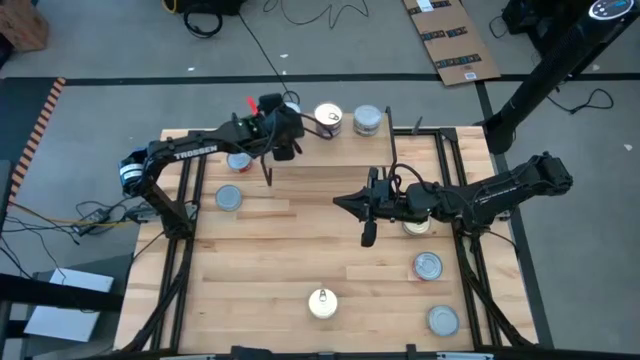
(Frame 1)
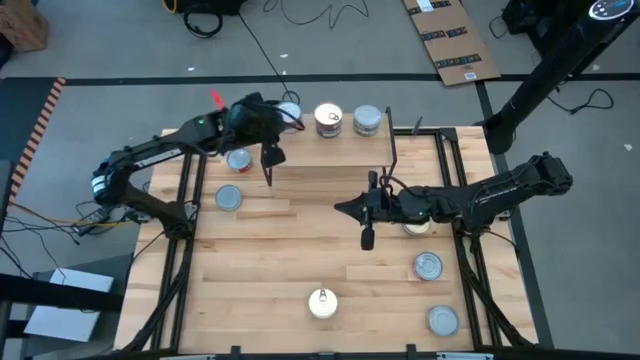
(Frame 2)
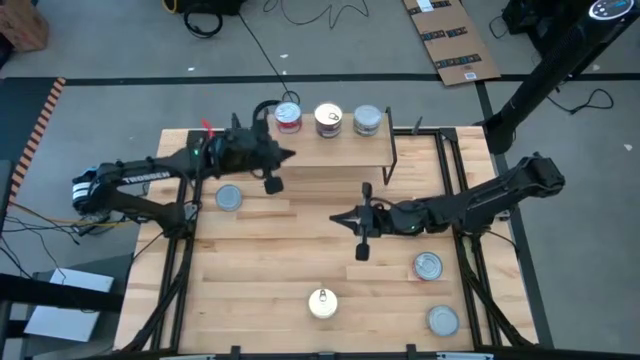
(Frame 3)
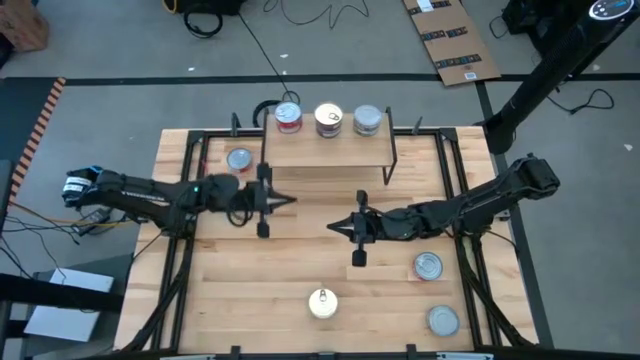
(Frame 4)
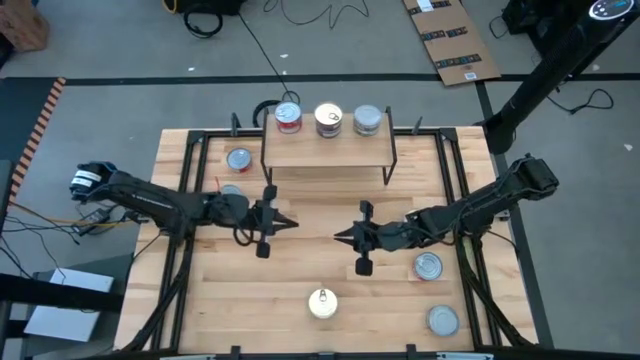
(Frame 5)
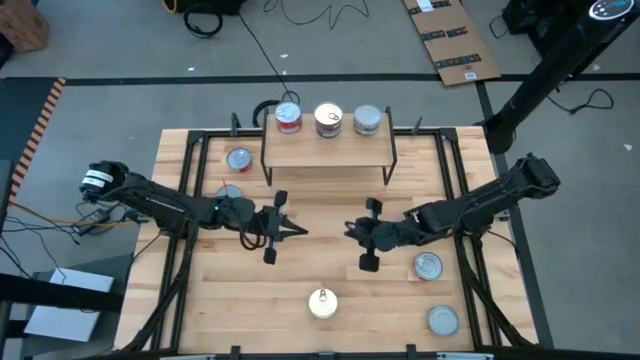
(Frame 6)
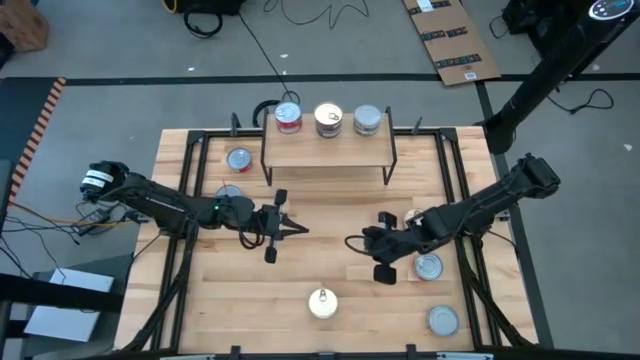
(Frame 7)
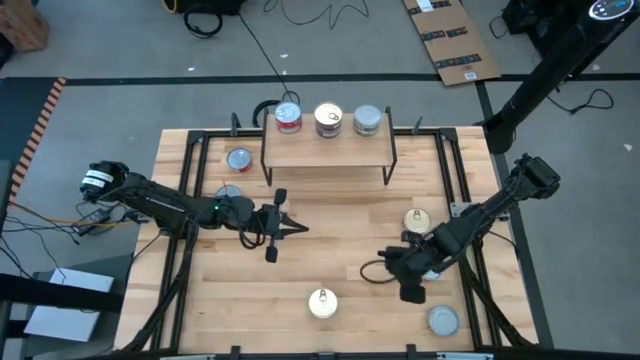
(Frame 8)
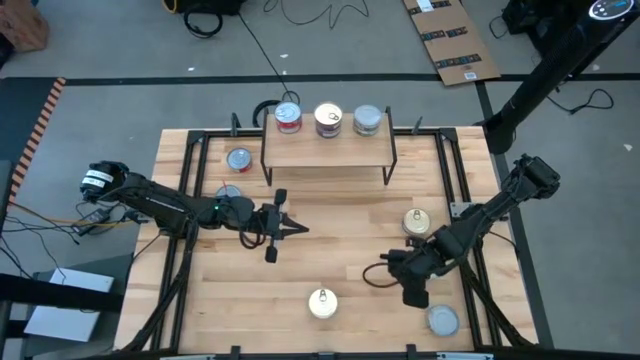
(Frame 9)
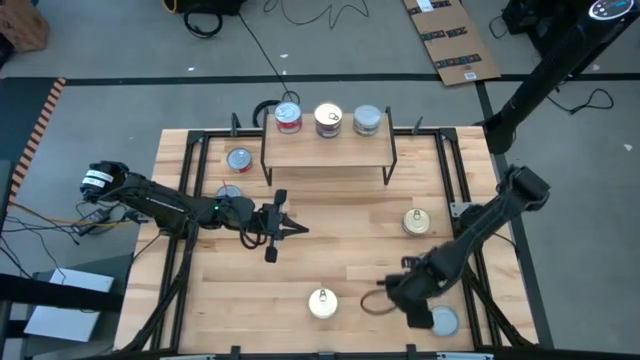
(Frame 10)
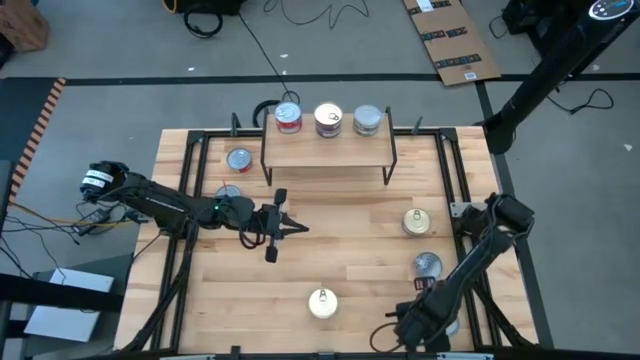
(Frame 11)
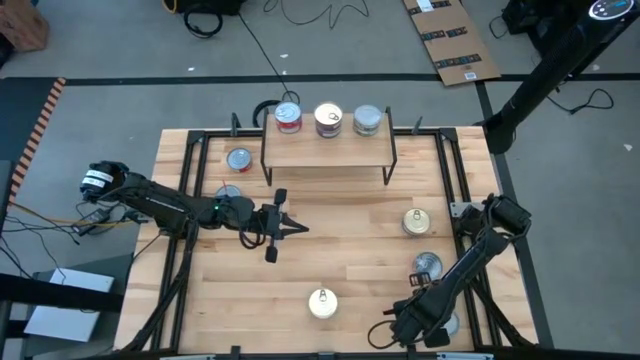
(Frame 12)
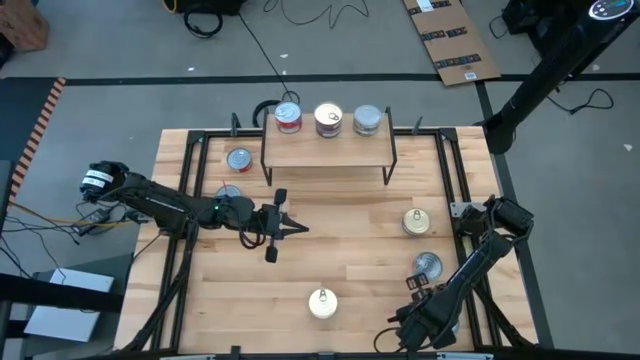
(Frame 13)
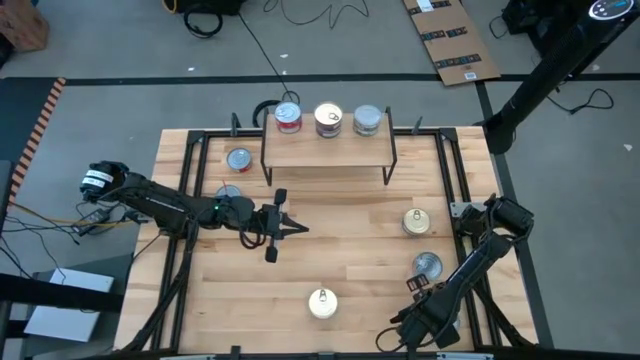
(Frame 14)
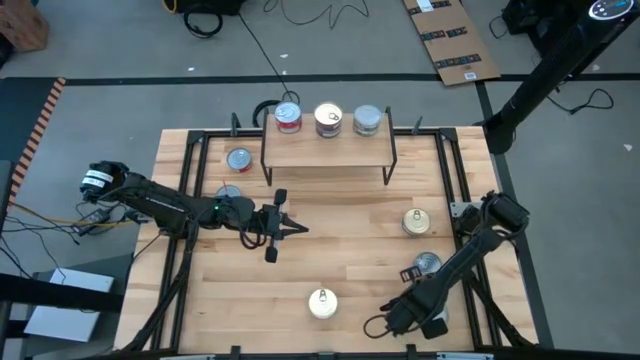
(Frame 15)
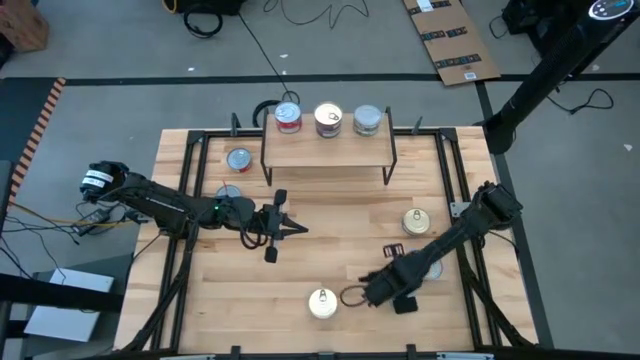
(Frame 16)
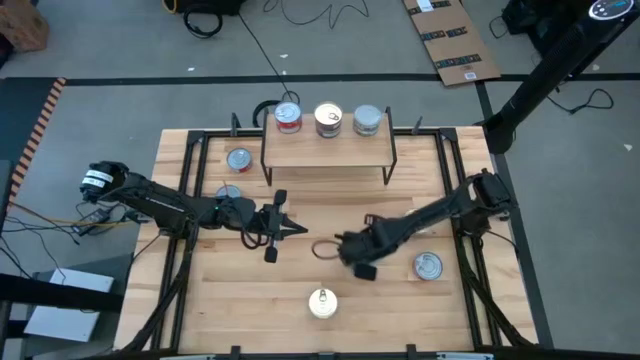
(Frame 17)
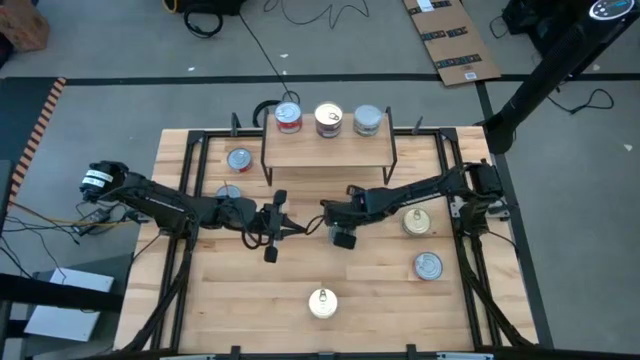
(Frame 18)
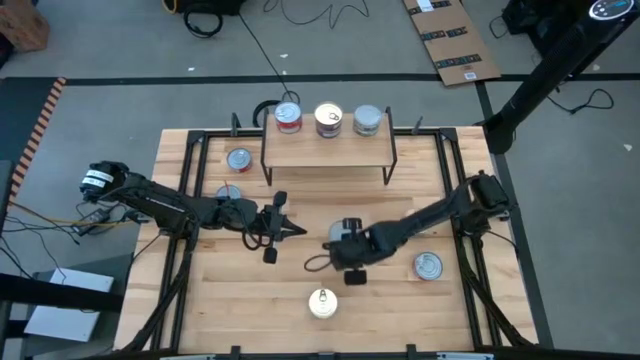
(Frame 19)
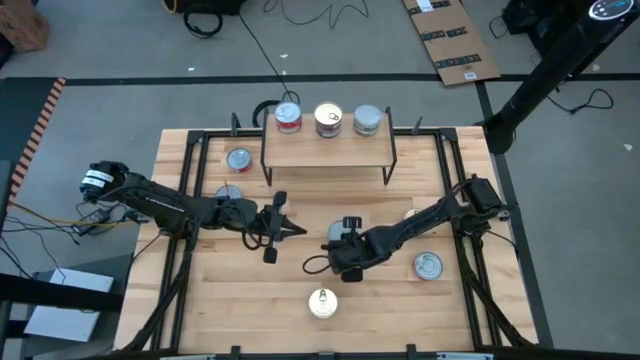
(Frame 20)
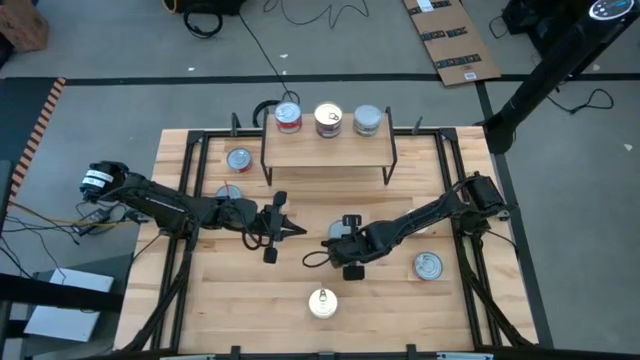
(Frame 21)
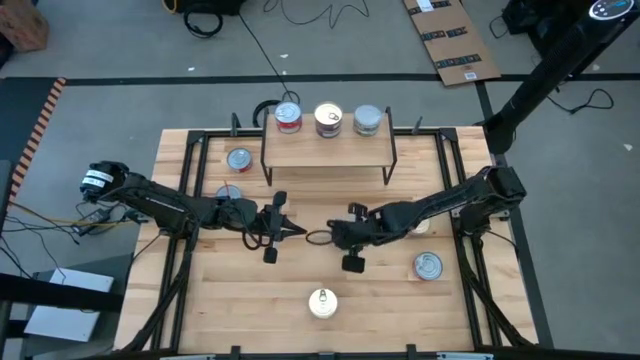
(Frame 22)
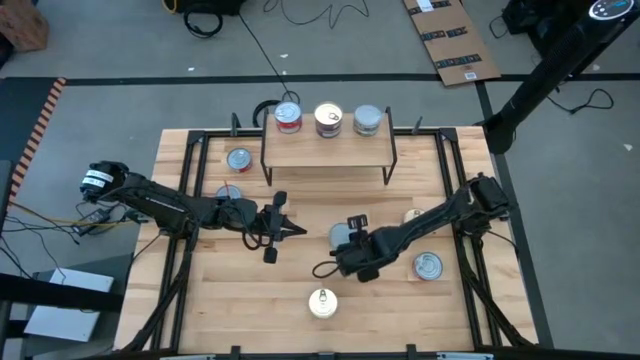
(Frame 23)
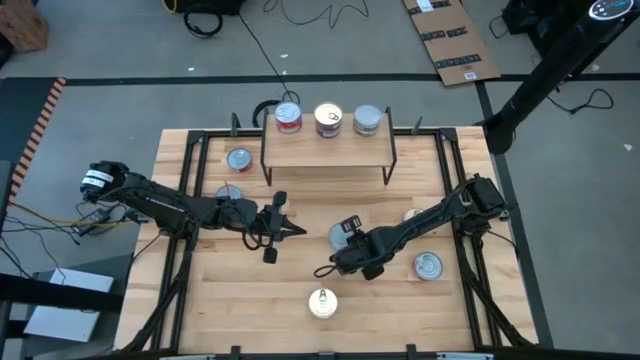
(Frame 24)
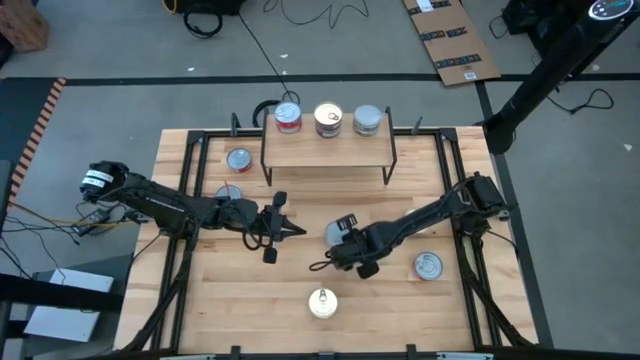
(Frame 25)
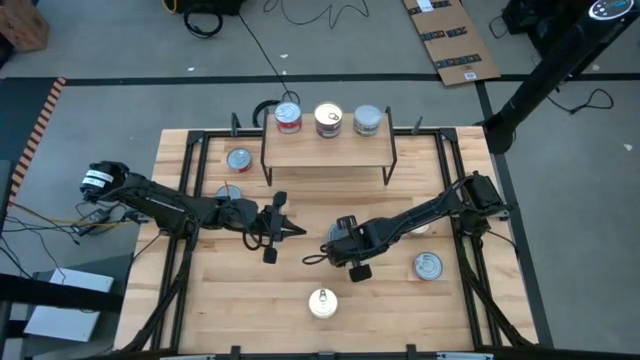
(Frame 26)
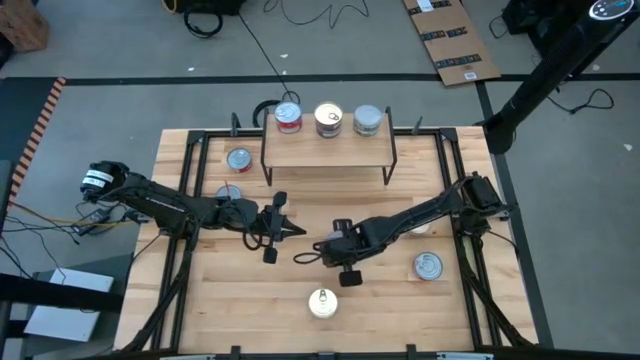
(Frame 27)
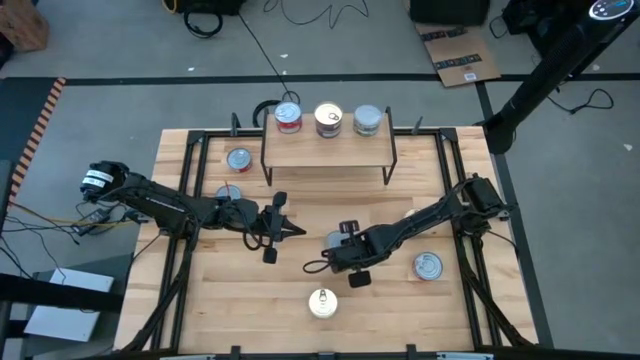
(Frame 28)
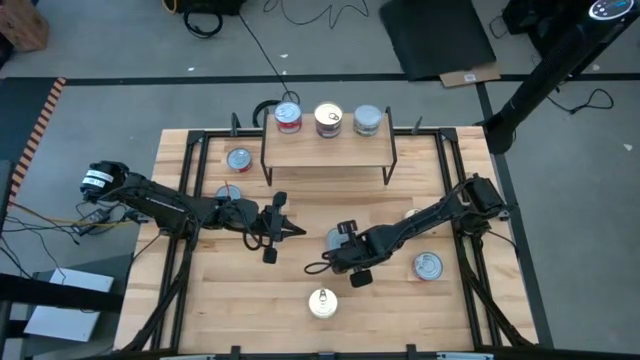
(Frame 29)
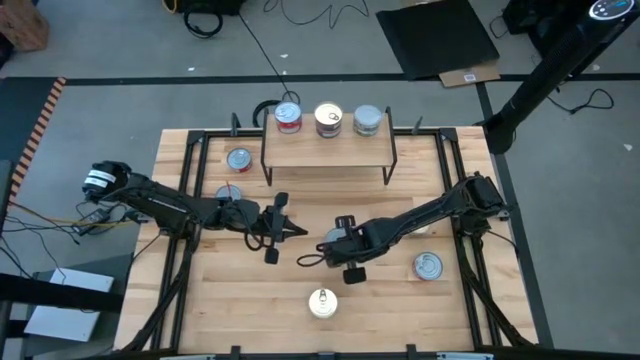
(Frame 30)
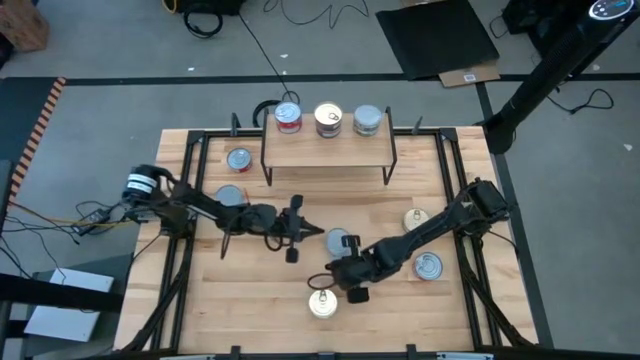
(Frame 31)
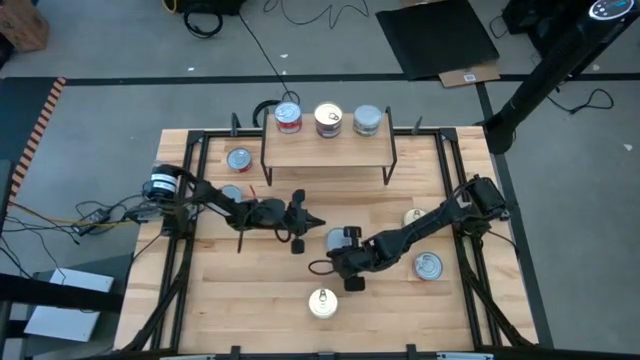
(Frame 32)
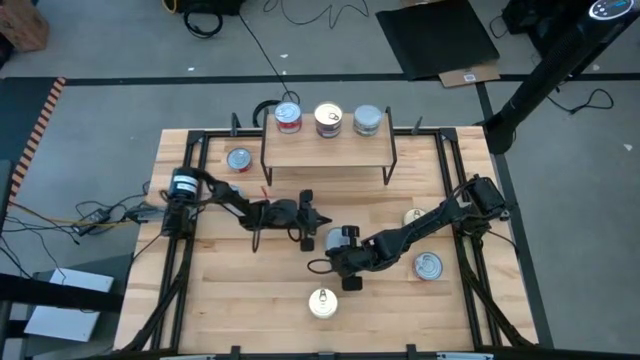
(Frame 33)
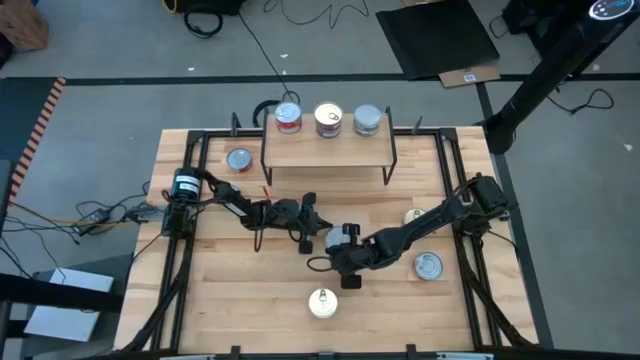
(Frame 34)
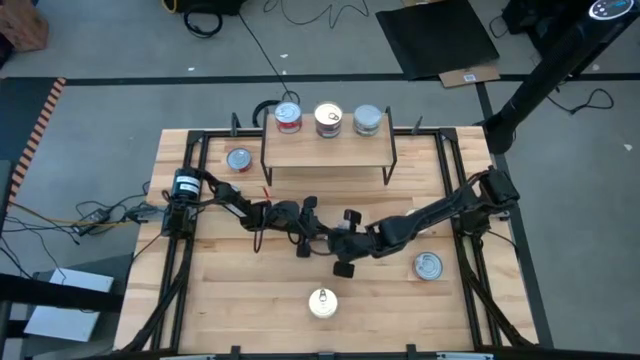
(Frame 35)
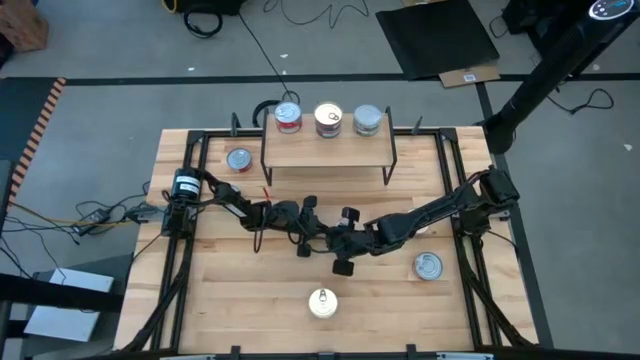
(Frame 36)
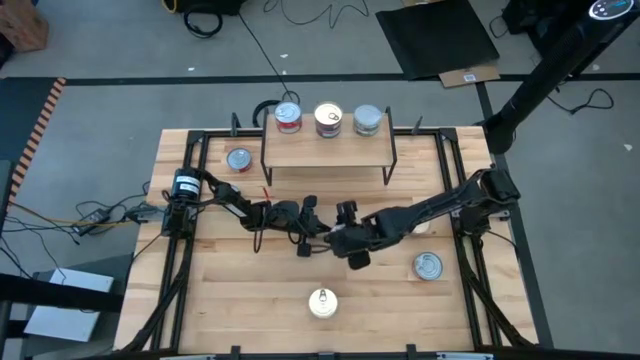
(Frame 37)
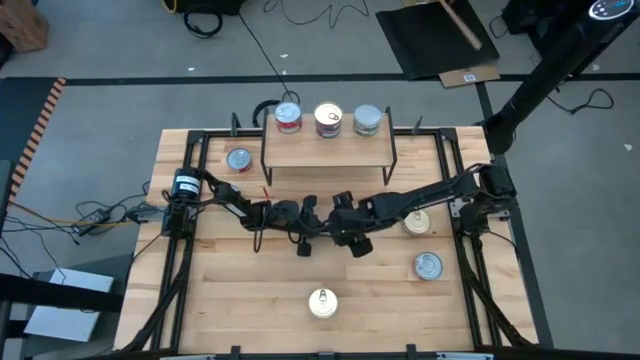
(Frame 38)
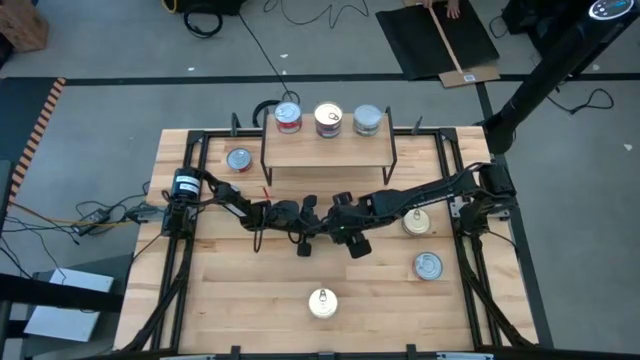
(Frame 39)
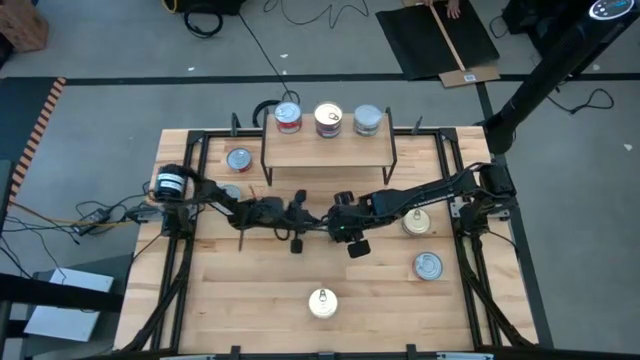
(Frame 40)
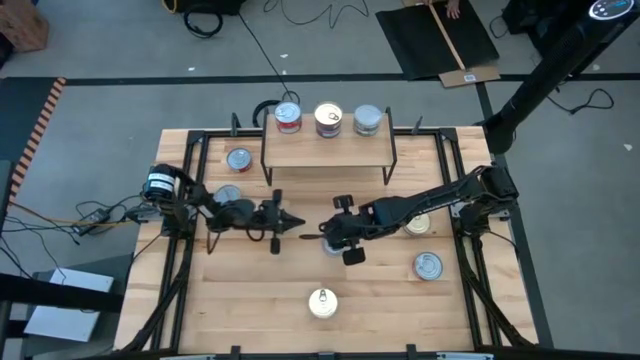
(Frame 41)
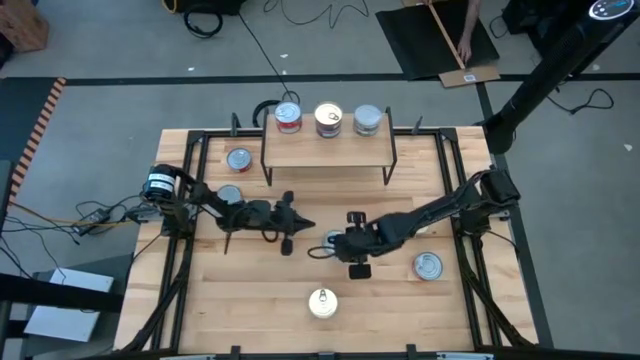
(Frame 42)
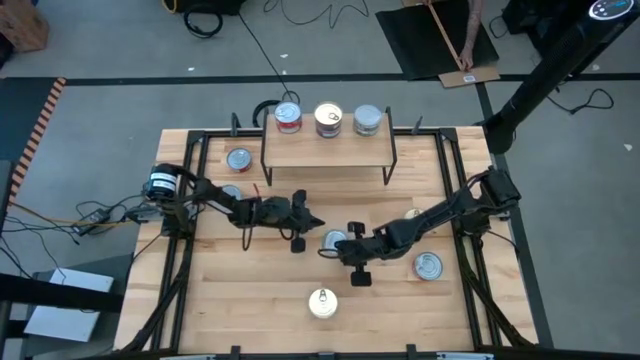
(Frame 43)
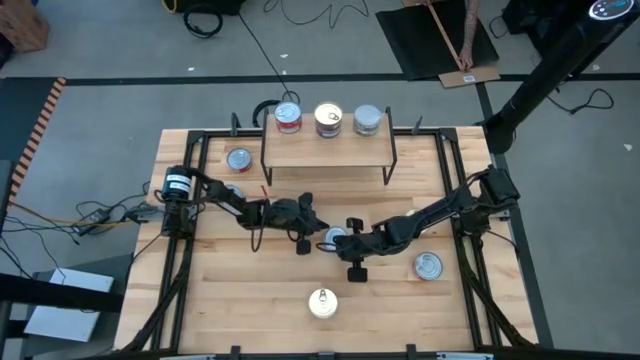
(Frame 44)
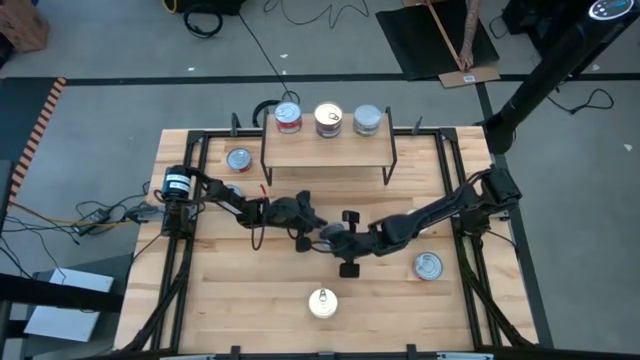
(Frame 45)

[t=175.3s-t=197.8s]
Task: Stack canned seafood by type on shelf
Put the green tuna can on the shelf aligned with the other green tuna can
